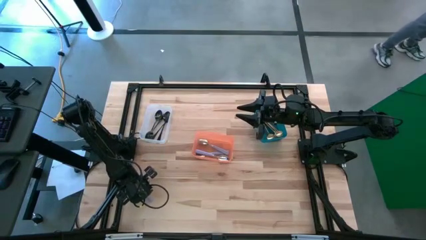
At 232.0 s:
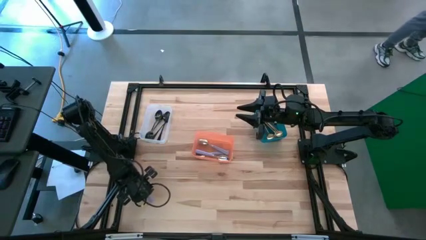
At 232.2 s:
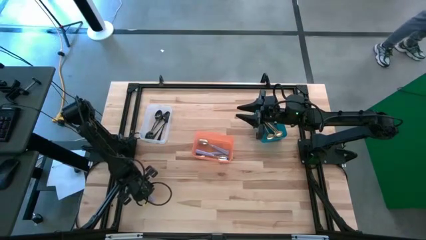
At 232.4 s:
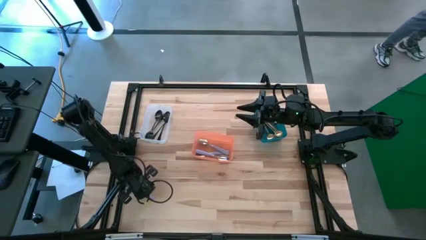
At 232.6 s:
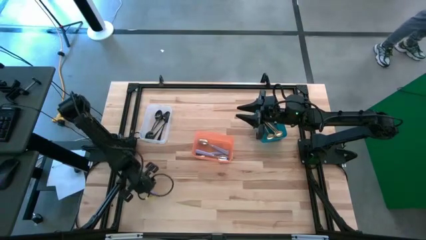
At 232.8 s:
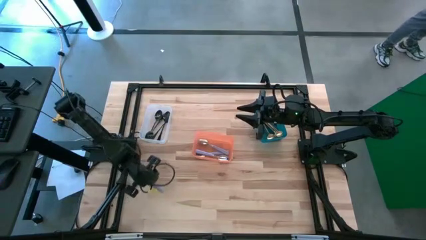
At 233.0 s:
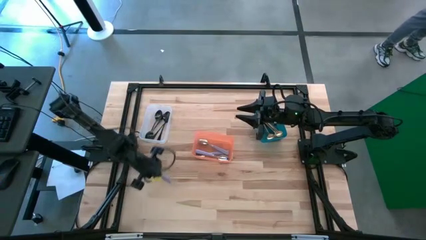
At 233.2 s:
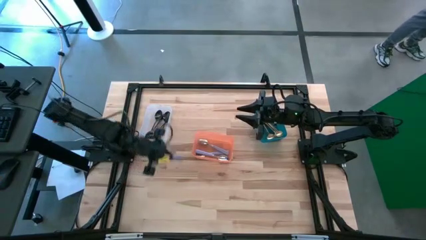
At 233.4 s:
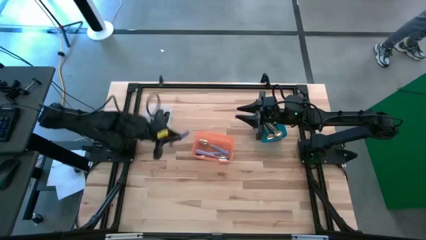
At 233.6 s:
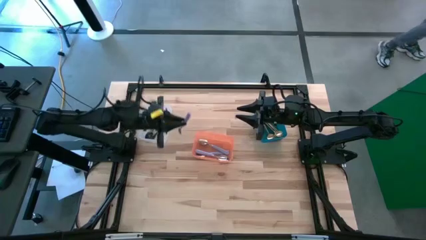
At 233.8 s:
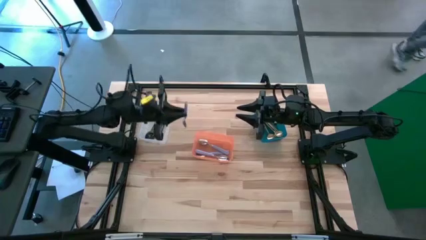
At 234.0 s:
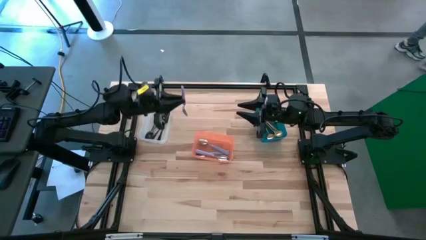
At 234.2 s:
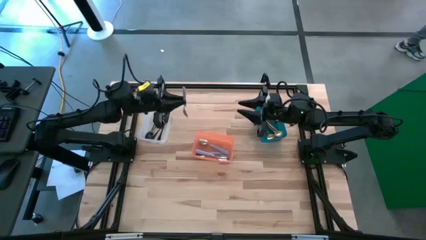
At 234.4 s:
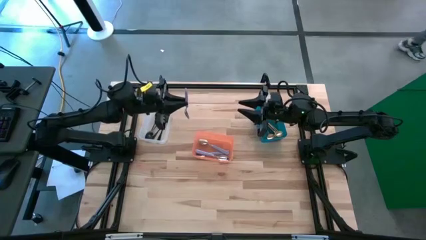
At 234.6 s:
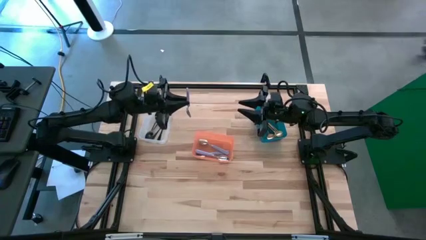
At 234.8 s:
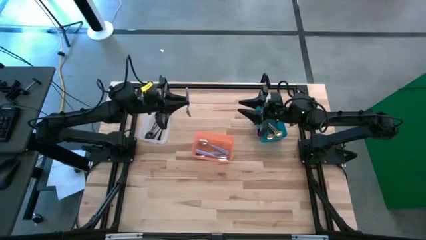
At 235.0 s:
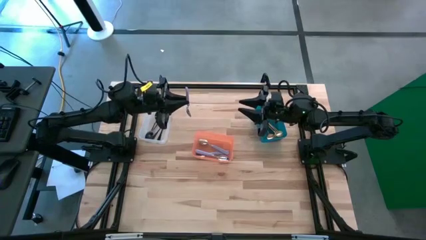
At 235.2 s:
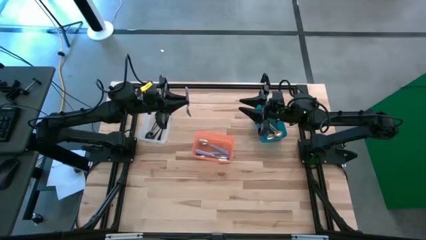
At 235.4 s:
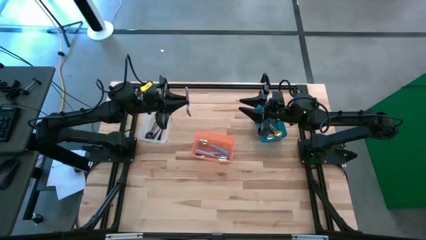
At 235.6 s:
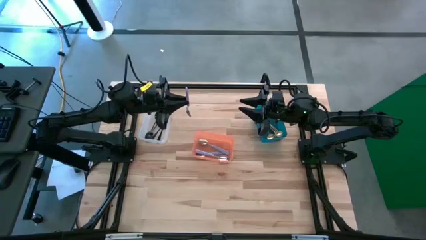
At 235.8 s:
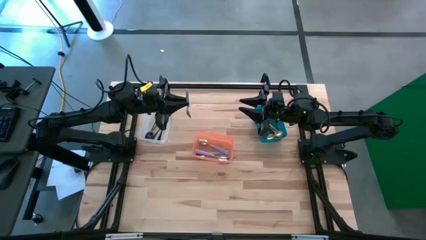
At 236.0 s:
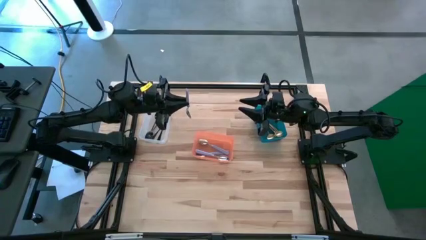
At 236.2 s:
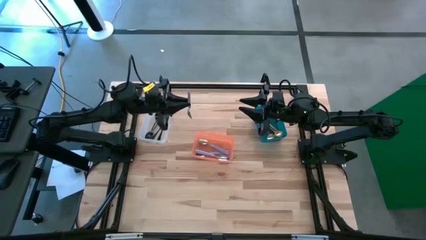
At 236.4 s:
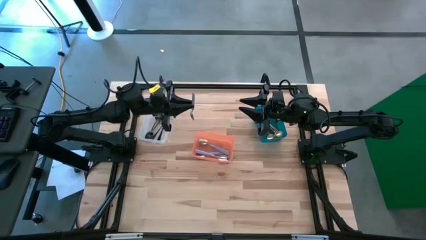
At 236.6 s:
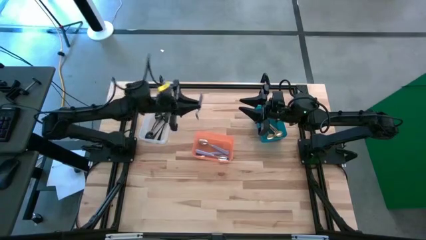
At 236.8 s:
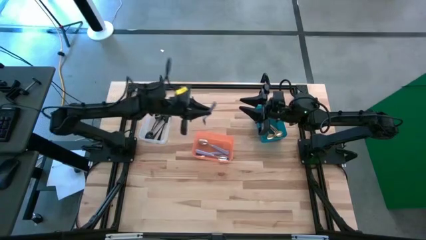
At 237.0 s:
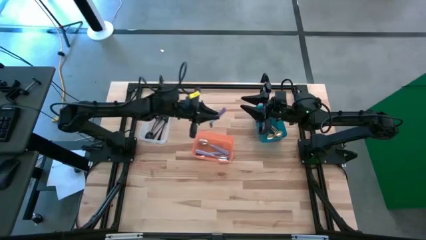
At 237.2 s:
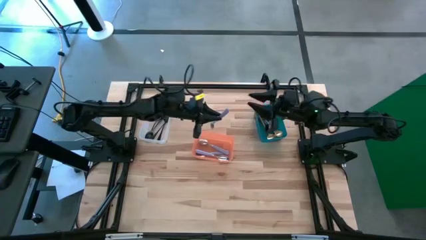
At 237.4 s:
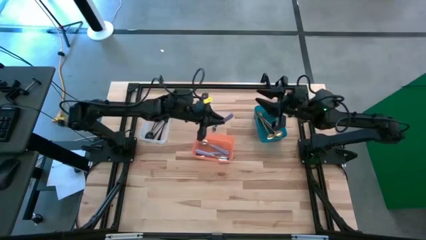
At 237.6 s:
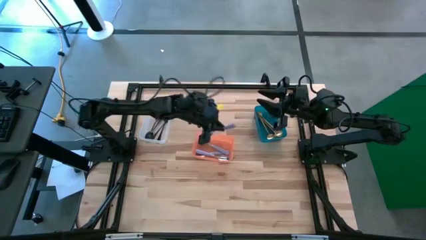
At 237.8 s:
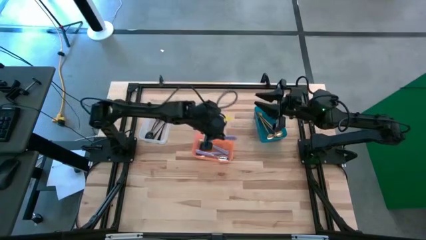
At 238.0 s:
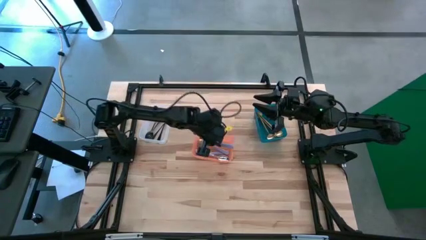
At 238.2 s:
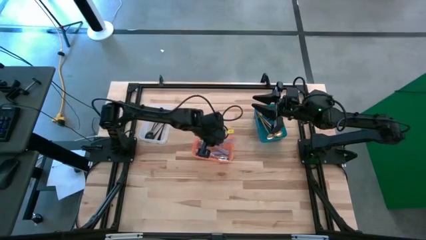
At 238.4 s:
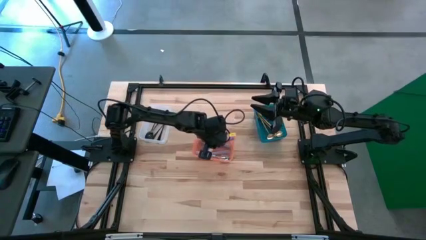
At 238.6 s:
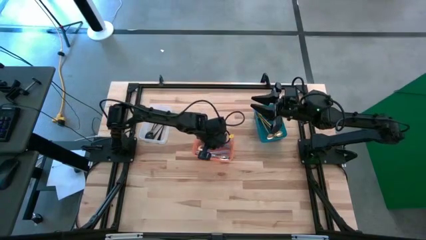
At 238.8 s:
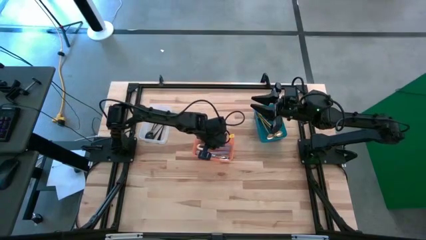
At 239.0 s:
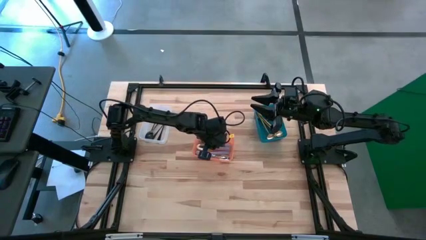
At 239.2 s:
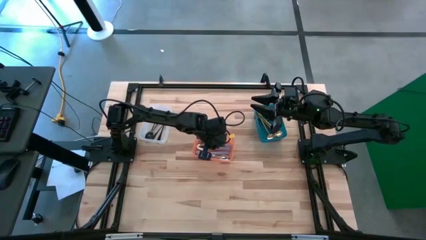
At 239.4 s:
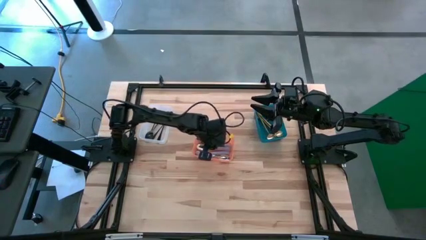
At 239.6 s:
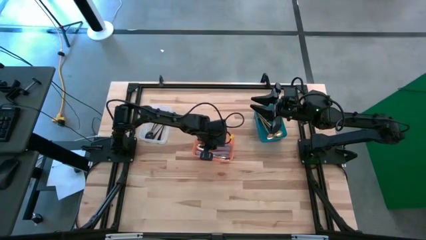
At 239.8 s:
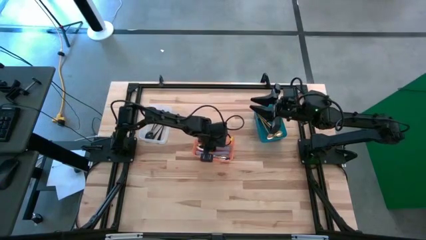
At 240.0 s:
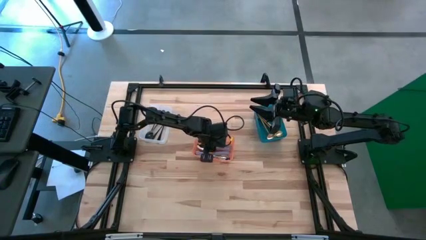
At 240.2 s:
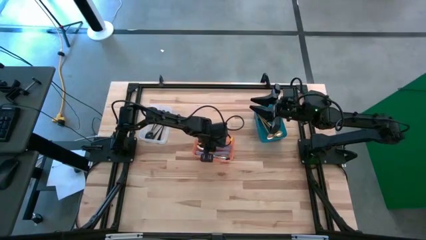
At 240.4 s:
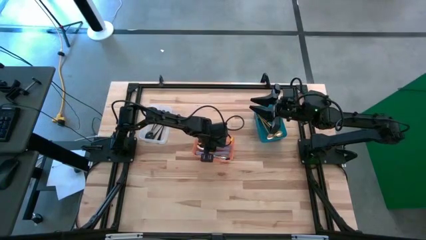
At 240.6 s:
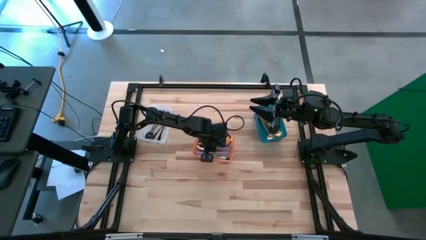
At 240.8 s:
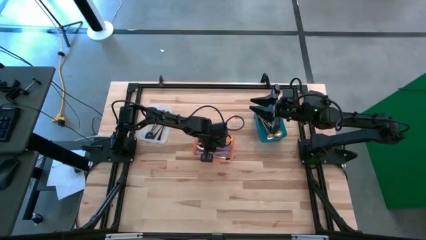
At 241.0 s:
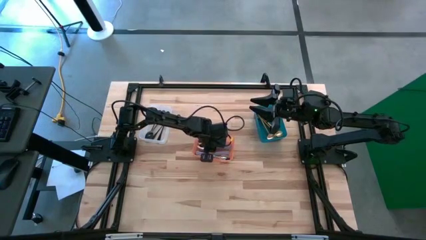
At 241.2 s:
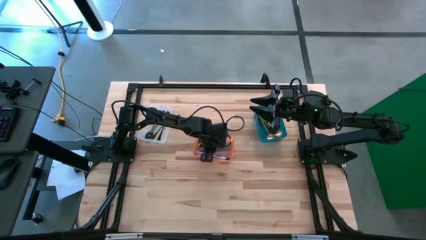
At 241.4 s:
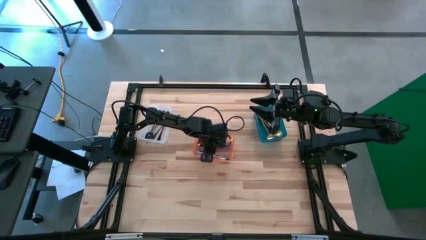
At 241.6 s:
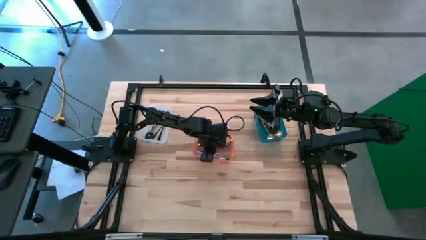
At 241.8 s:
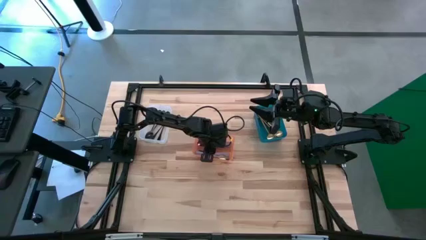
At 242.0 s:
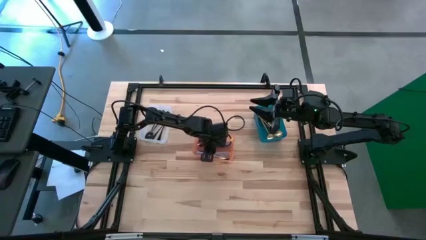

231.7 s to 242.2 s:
Task: Sort silverware by color (type)
Put the violet spoon into the orange bin

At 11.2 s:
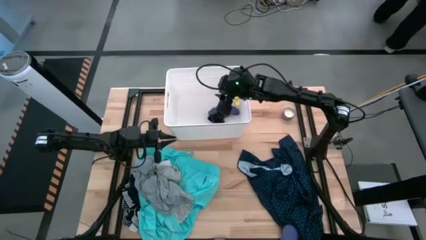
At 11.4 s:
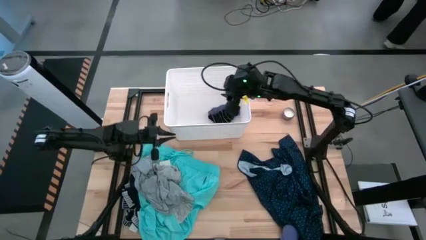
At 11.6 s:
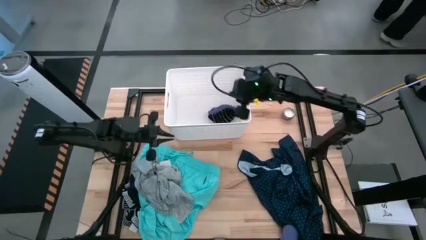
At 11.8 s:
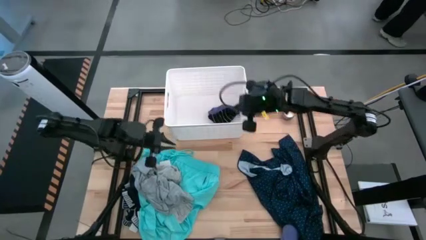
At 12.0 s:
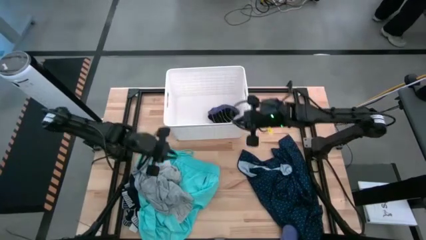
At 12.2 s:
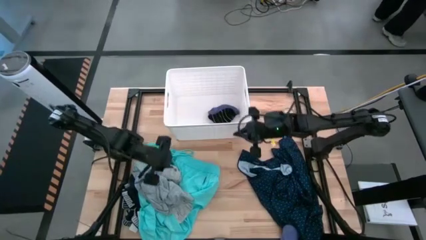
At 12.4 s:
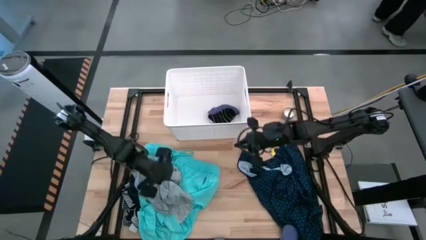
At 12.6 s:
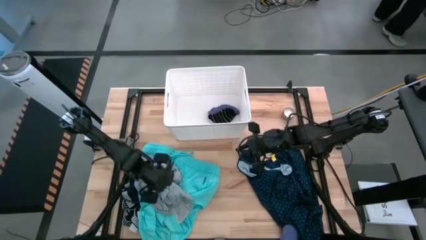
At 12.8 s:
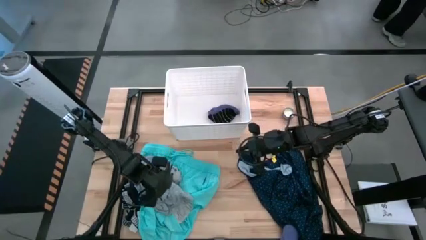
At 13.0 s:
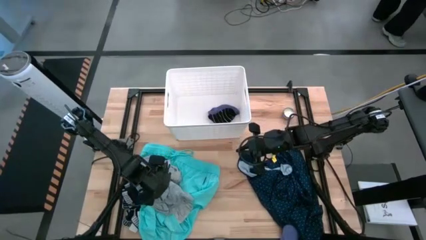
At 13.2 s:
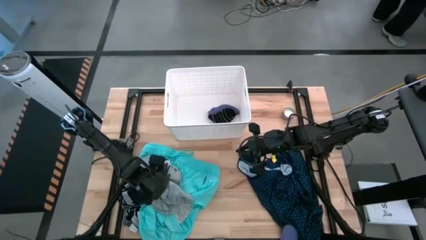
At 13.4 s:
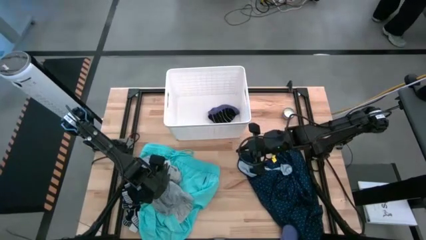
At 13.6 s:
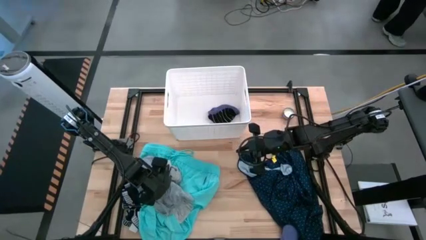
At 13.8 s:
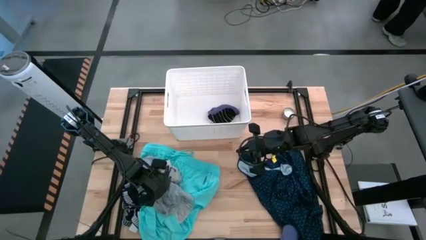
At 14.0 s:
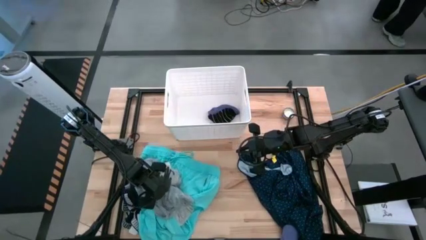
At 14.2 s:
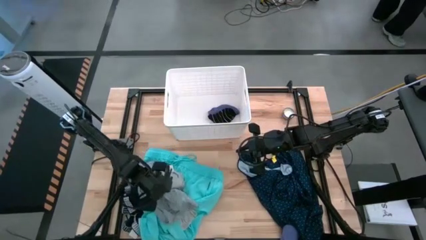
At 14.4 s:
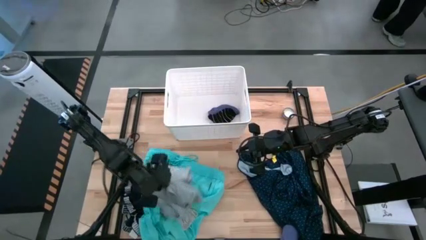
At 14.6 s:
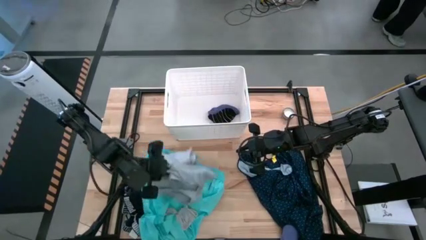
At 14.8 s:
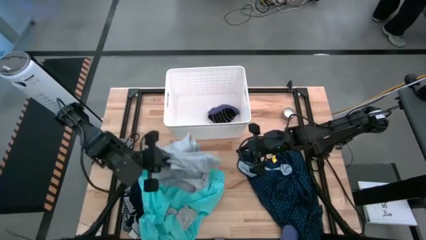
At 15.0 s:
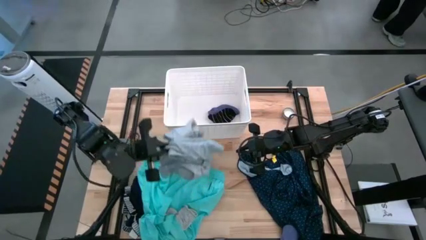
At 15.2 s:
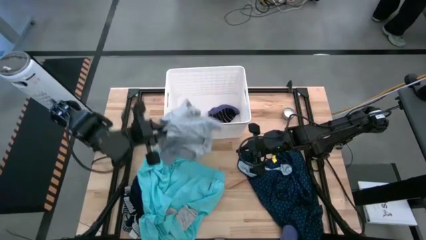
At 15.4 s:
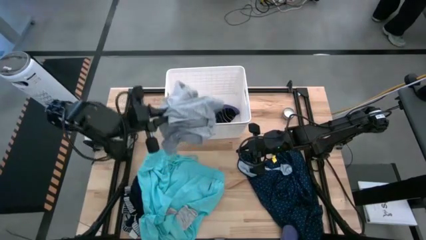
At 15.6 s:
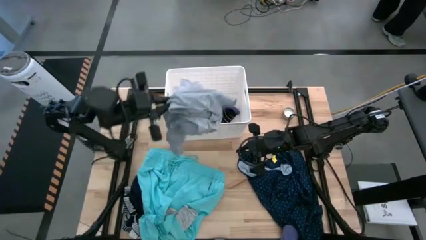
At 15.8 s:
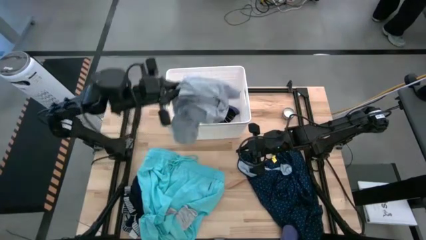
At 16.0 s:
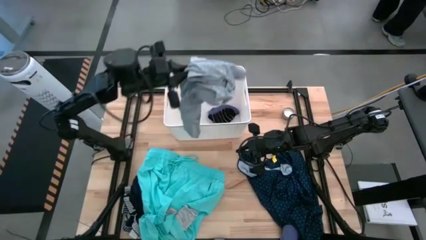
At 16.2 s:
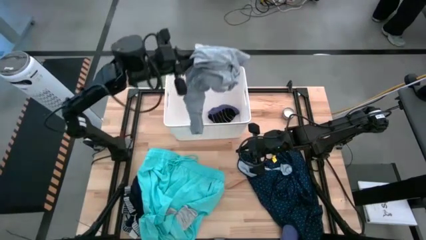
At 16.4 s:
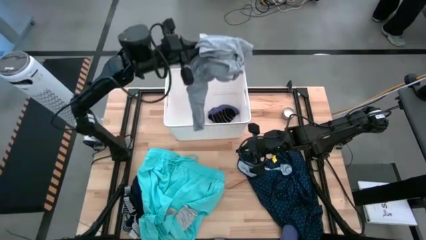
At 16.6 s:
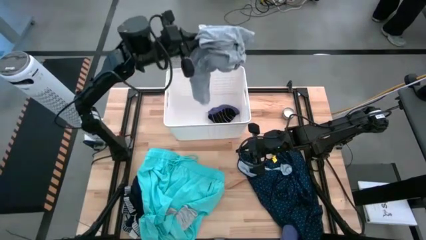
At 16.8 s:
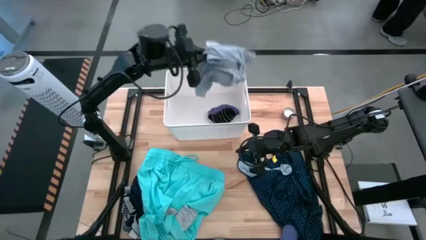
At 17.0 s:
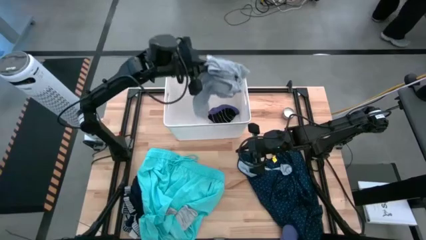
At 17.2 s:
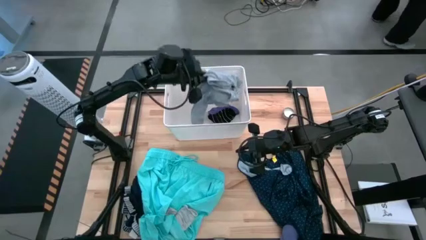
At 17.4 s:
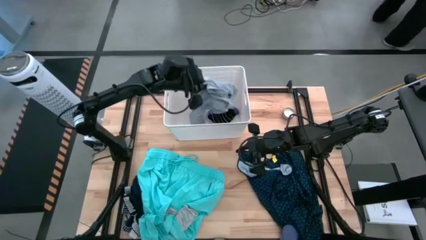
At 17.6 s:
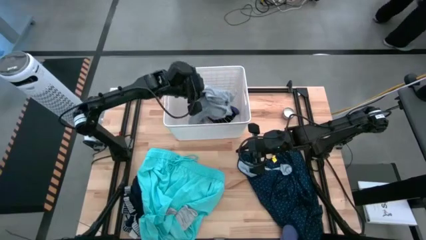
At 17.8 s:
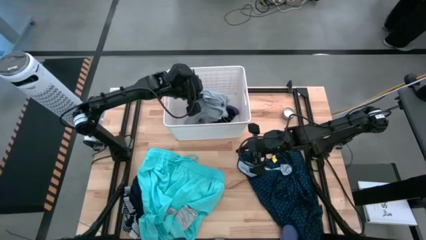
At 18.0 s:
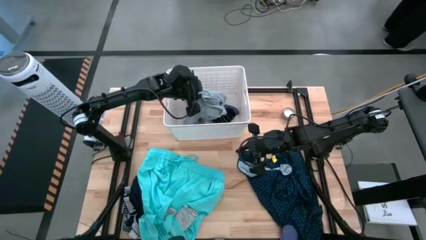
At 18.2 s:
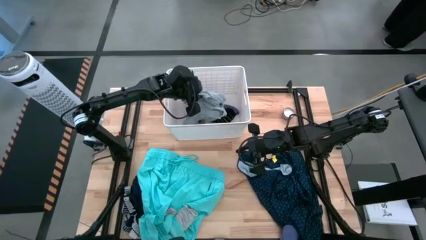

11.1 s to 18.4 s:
Task: Sort clothes
Put the gray shirt into the white bin
